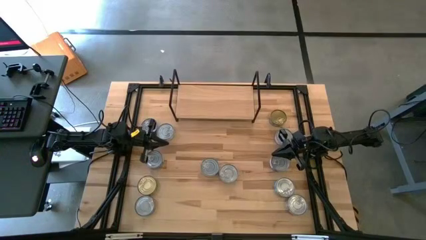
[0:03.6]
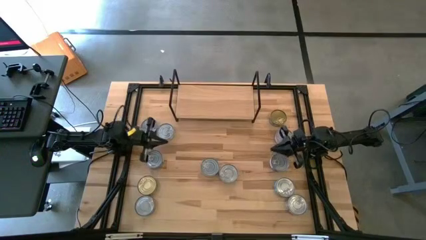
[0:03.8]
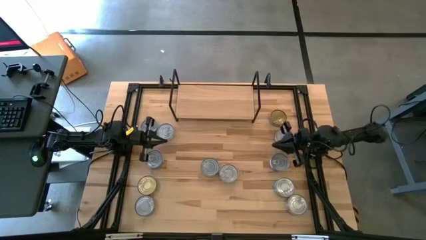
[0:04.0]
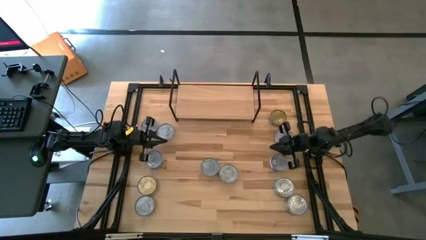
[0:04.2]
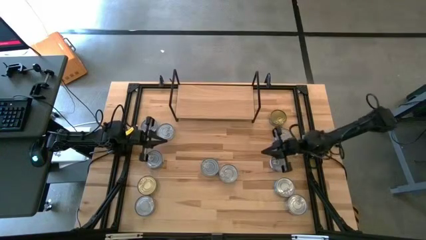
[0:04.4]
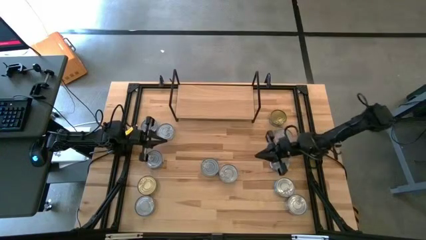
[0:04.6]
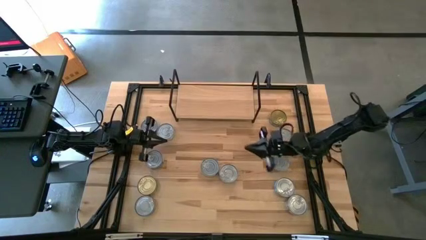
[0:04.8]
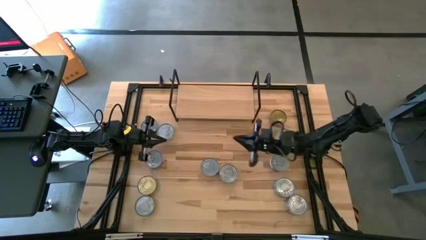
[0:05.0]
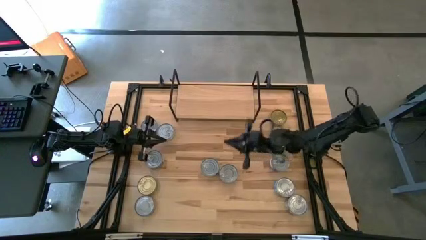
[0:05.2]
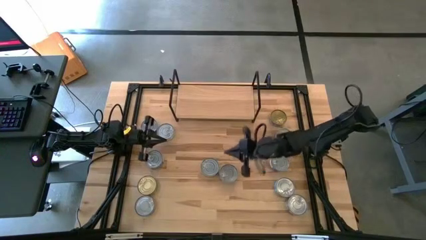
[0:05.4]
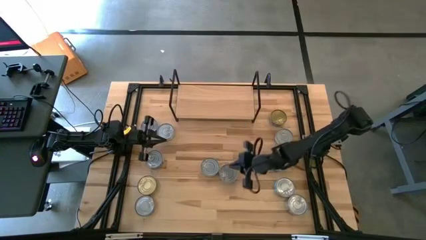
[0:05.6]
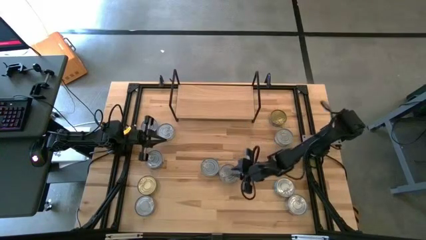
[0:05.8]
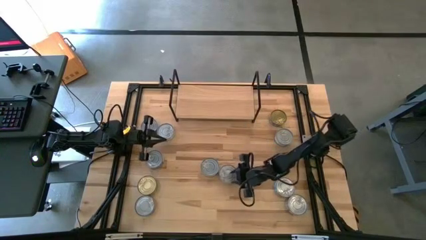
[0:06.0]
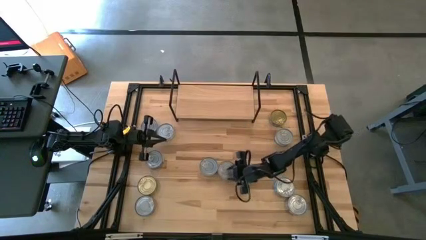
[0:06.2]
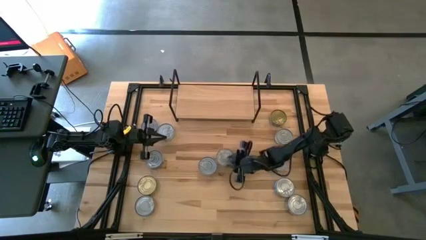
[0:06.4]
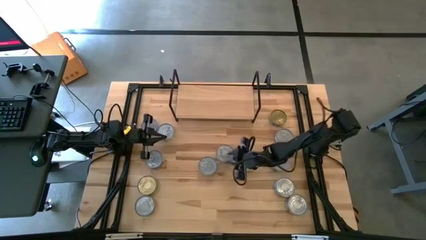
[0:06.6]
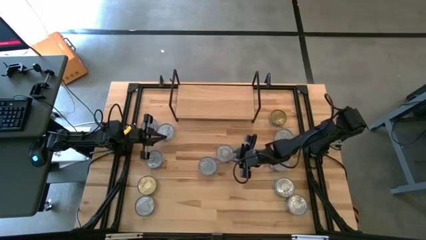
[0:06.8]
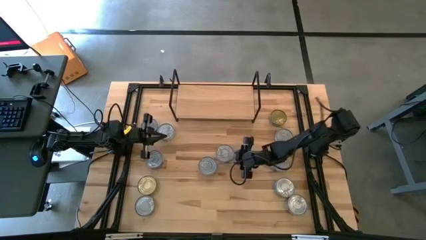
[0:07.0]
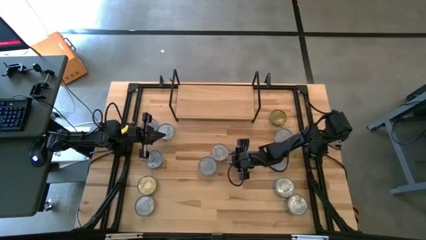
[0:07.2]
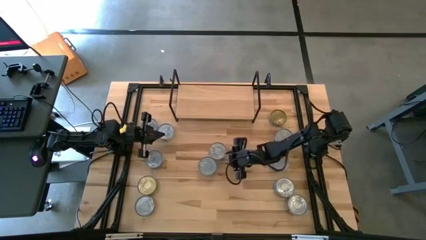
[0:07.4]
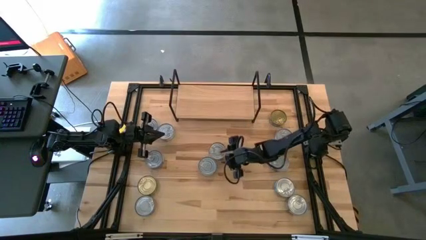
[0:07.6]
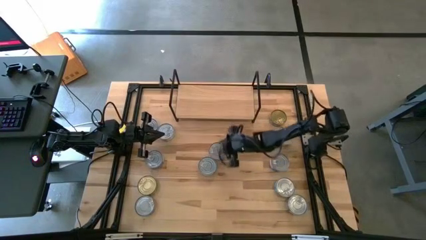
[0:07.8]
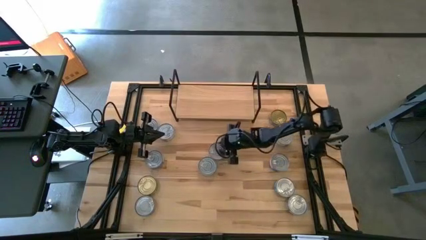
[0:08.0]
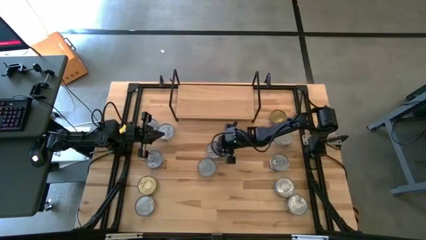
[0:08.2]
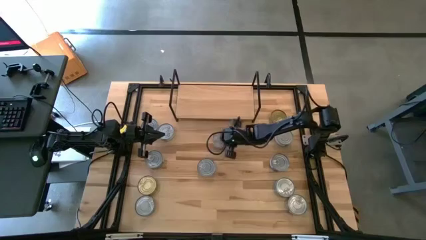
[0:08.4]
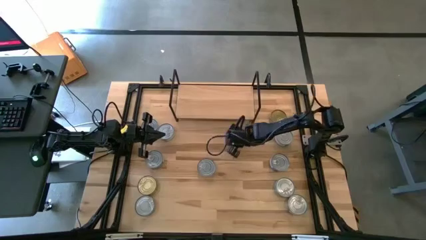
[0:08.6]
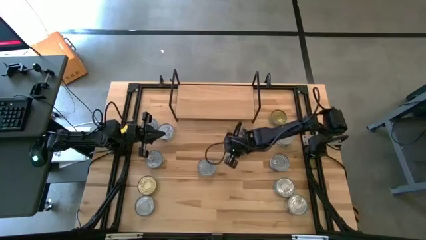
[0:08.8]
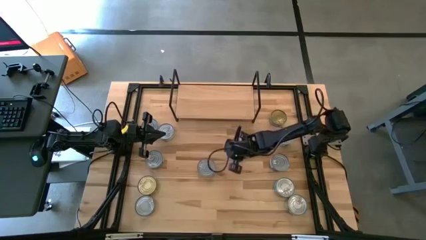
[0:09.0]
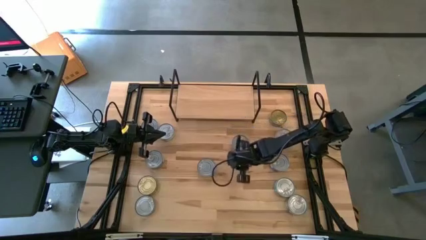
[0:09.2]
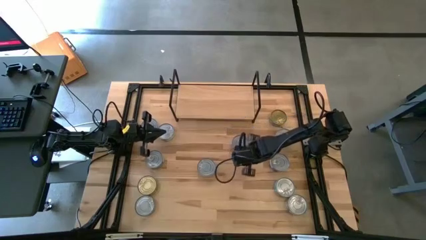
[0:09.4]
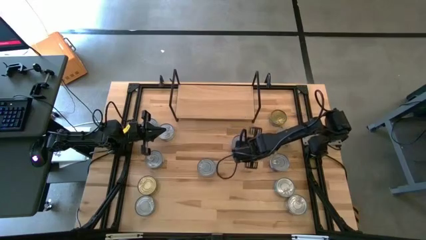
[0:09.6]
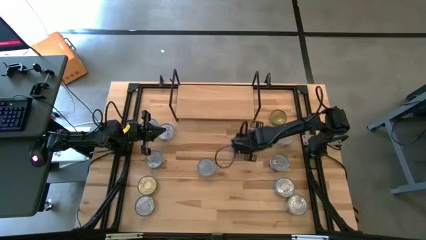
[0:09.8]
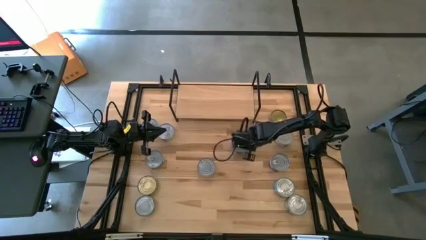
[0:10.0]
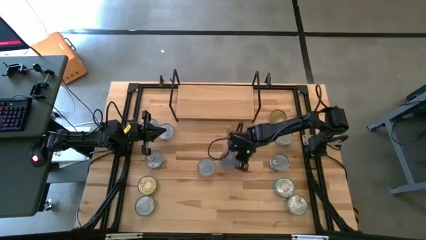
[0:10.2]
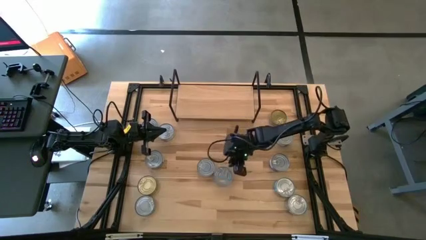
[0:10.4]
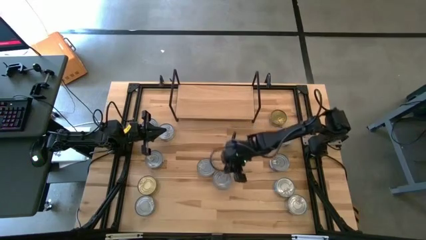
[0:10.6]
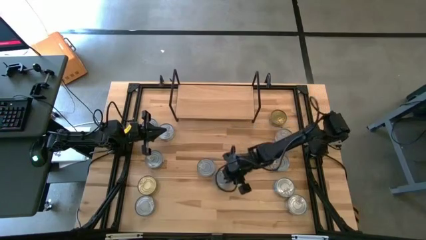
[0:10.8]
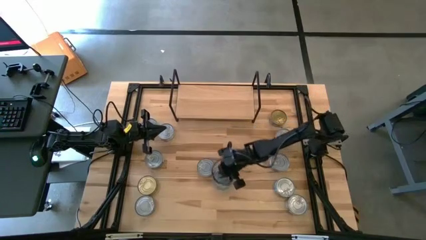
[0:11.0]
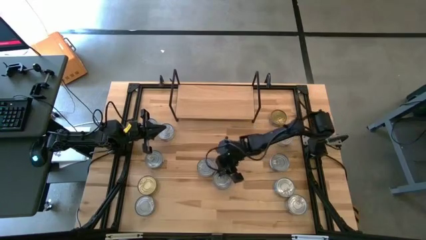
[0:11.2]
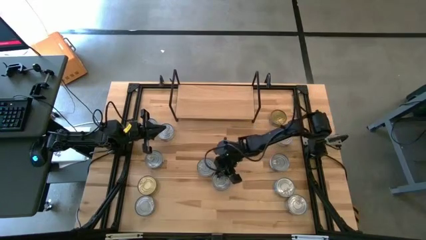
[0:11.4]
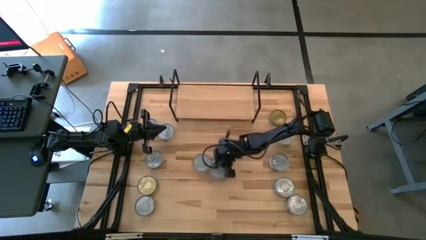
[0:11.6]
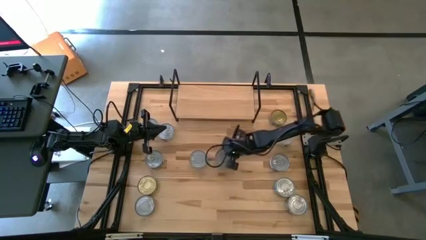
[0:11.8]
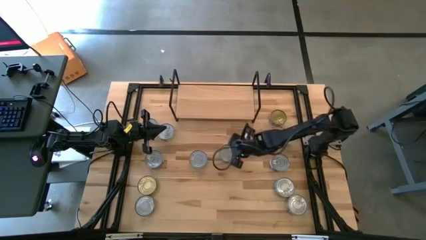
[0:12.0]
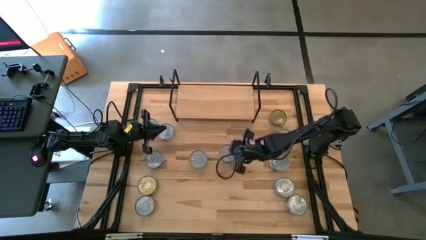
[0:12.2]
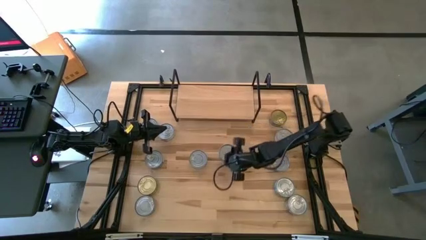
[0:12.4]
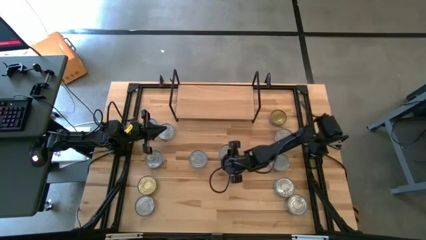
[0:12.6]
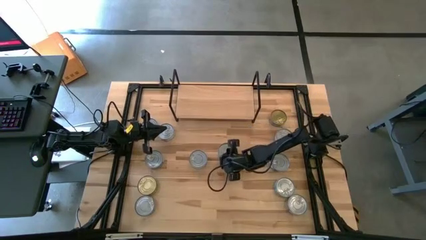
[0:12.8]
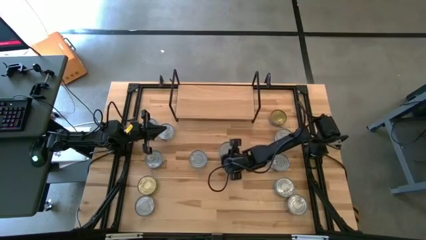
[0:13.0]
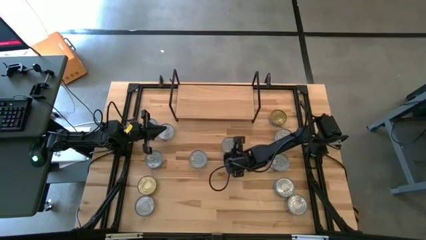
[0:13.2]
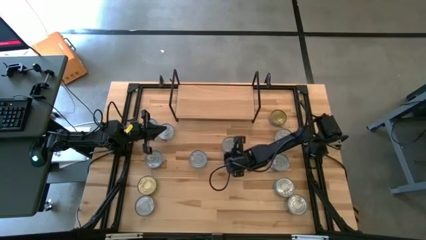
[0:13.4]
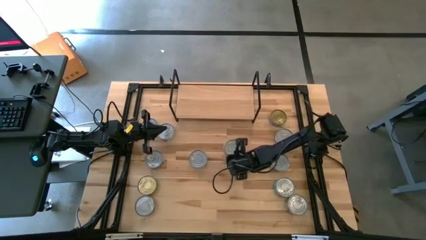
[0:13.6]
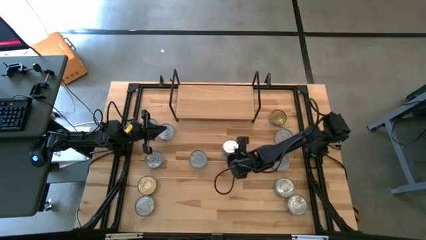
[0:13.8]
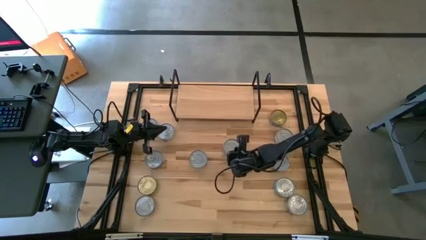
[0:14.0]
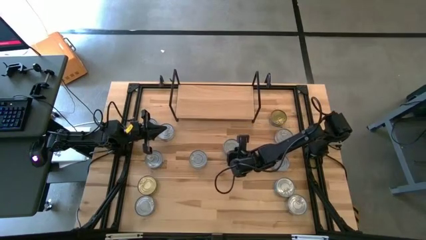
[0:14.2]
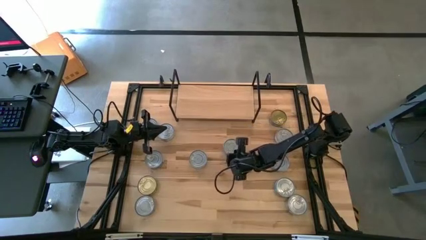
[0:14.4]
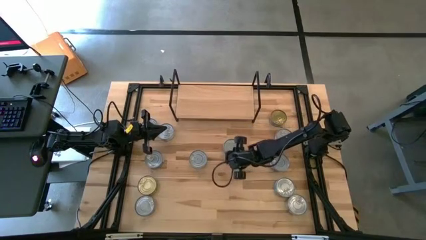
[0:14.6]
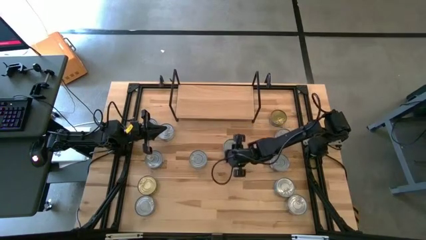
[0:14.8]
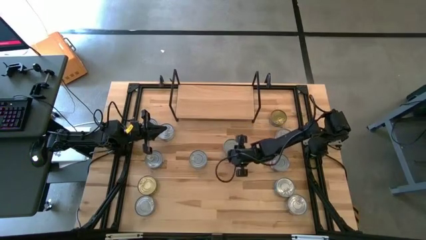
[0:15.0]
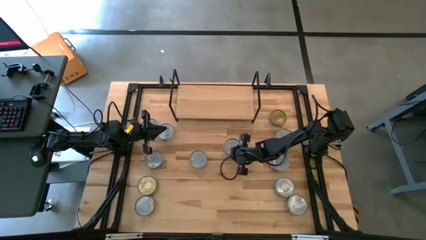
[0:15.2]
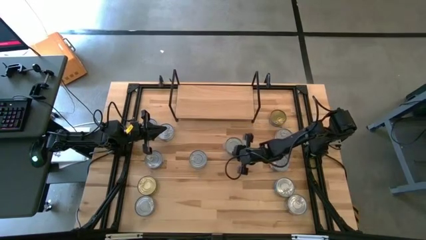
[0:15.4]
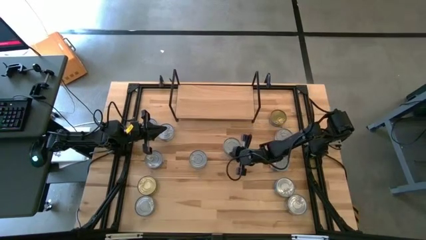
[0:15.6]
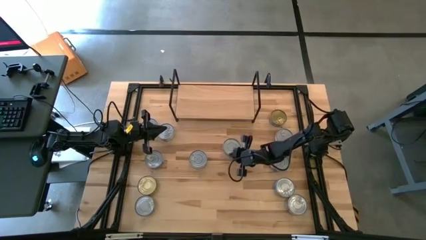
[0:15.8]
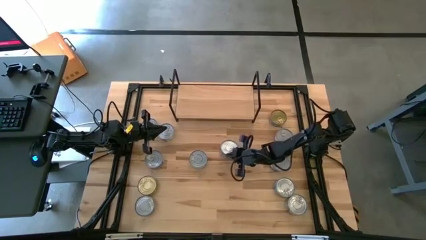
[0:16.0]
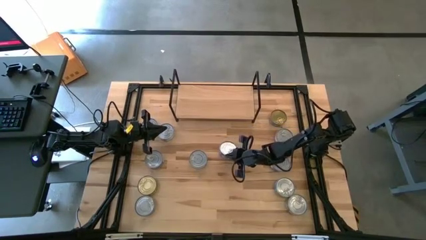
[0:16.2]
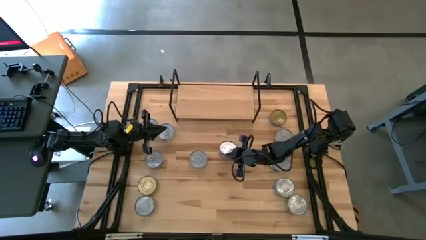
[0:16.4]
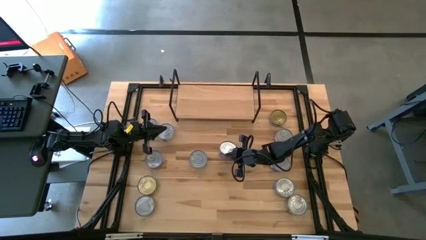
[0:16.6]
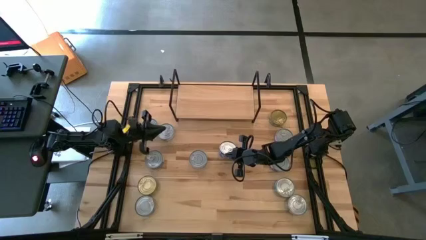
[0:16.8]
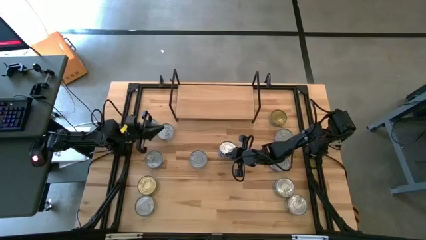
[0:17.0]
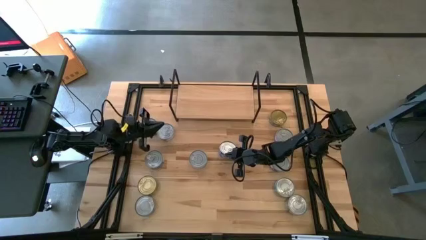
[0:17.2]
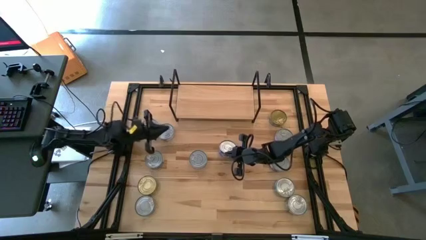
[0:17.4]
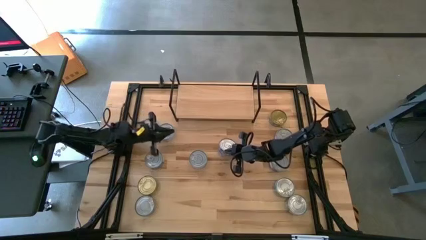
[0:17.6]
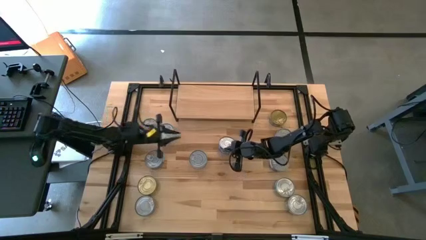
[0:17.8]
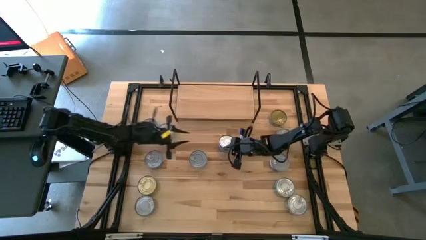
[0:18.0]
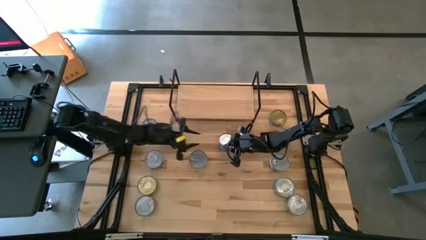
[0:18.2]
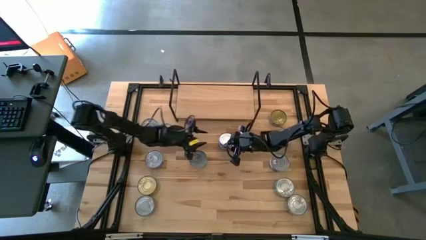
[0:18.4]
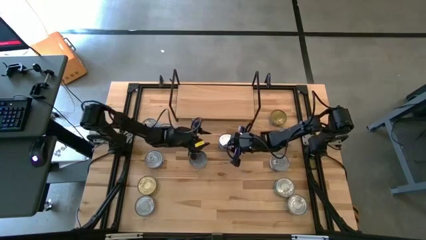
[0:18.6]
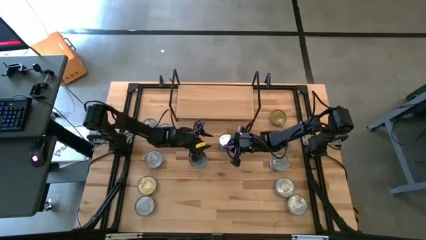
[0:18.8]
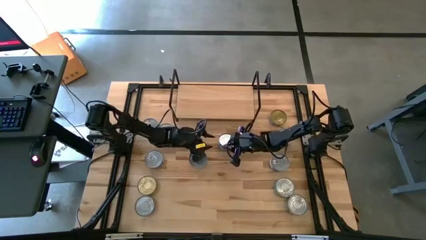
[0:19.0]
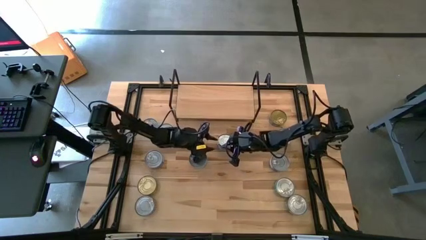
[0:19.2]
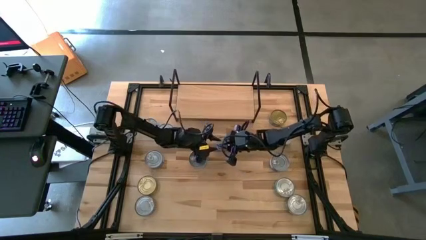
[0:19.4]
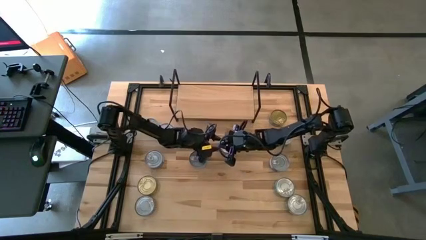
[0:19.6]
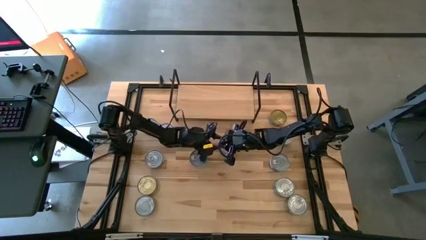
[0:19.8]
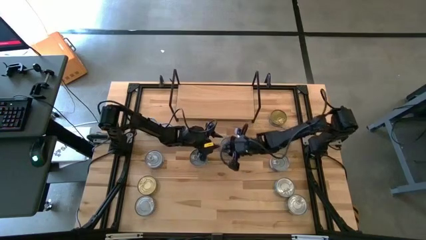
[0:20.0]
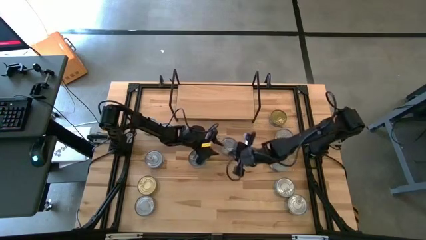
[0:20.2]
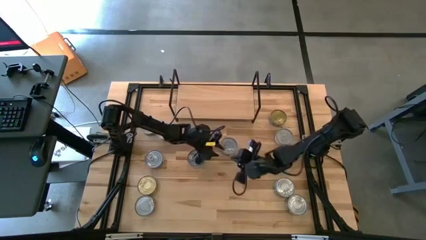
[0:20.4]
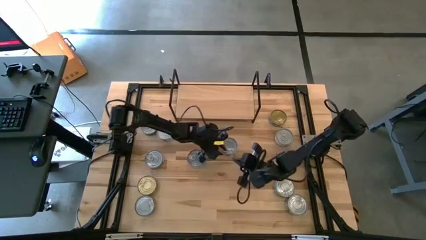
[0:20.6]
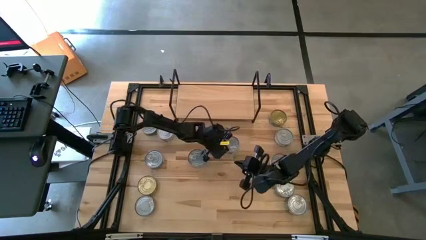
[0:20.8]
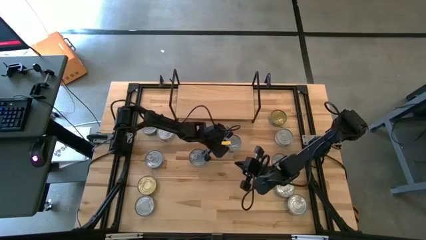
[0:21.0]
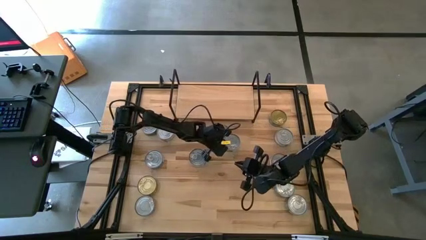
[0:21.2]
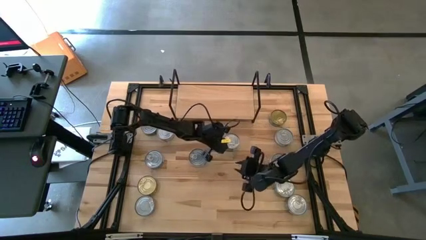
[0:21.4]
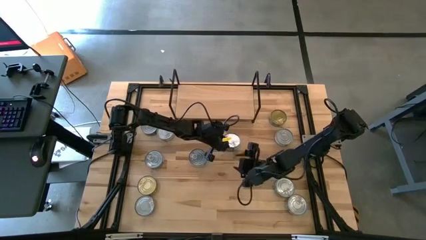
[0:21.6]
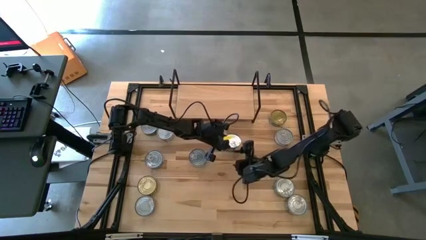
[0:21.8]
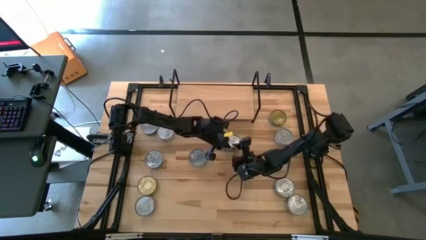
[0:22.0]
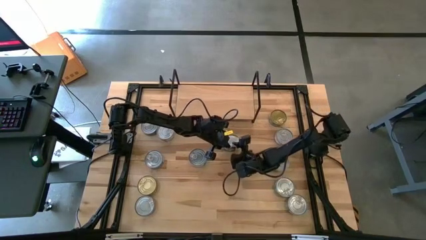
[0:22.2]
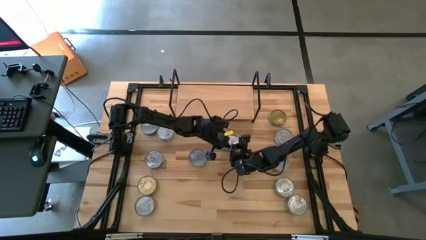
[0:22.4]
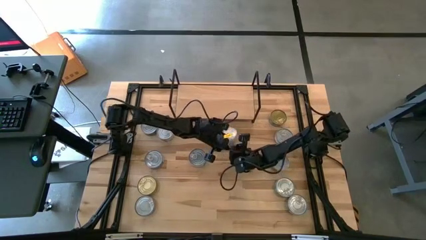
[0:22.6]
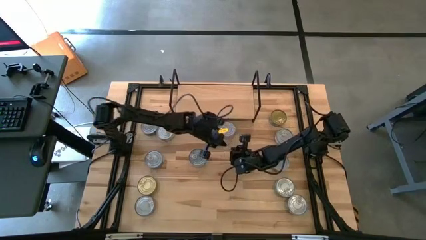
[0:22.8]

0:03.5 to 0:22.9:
Task: Stack canned seafood by type on shelf
Put the blue tuna can on the shelf
